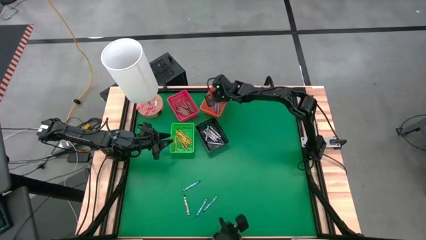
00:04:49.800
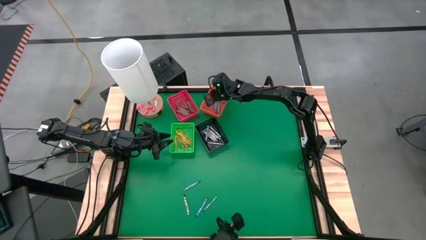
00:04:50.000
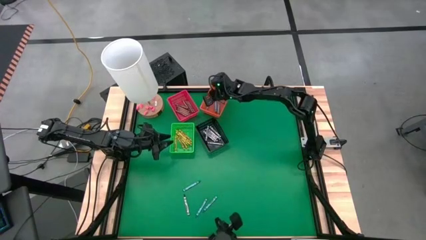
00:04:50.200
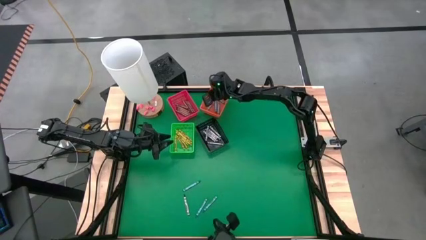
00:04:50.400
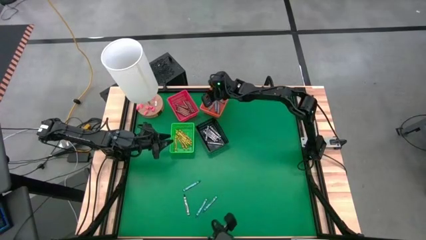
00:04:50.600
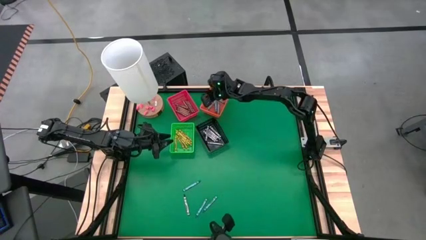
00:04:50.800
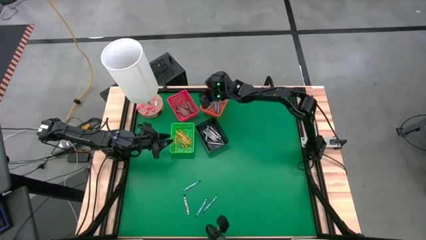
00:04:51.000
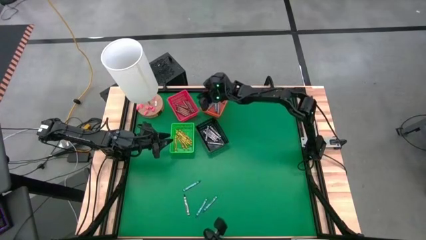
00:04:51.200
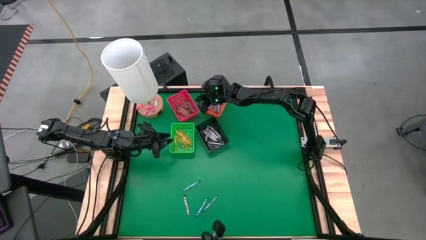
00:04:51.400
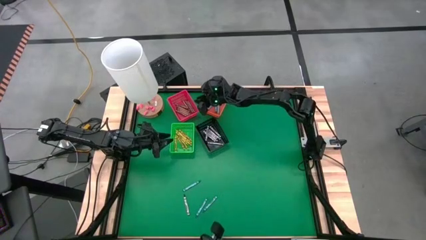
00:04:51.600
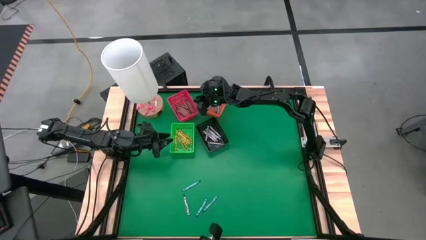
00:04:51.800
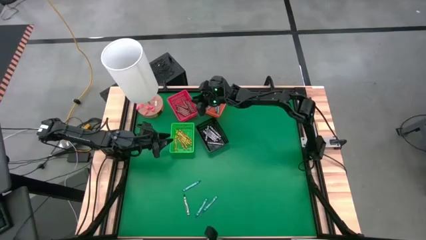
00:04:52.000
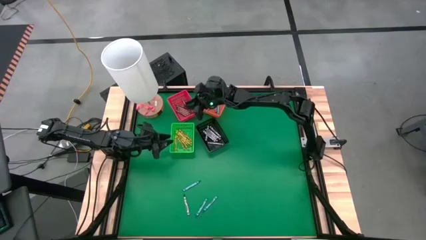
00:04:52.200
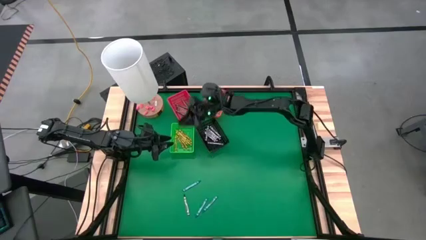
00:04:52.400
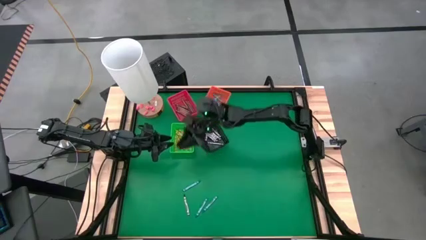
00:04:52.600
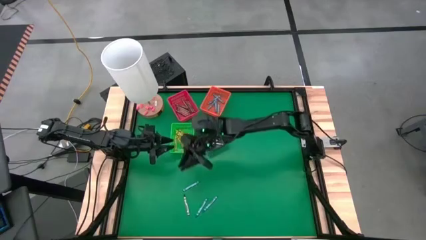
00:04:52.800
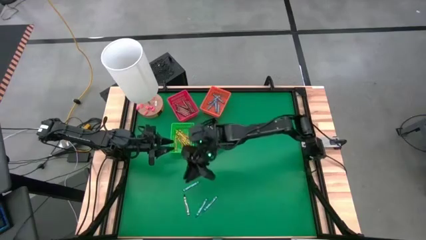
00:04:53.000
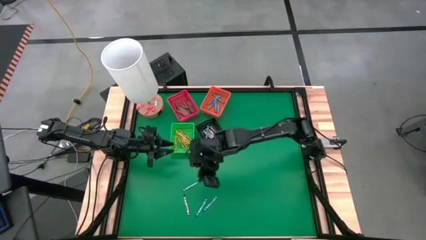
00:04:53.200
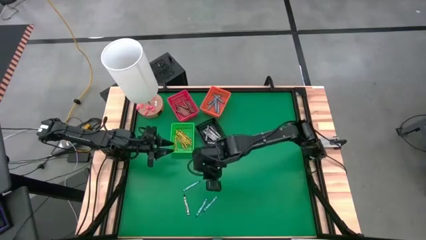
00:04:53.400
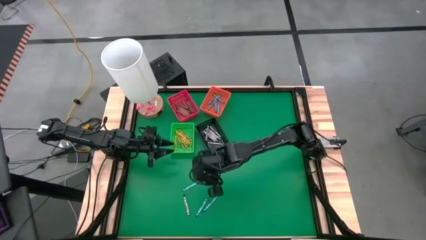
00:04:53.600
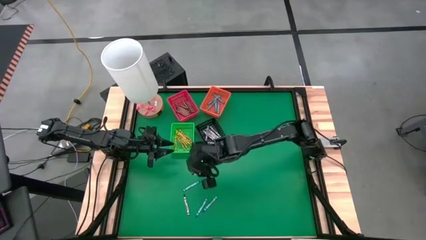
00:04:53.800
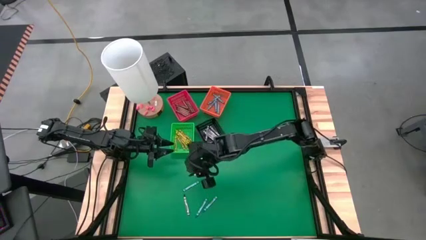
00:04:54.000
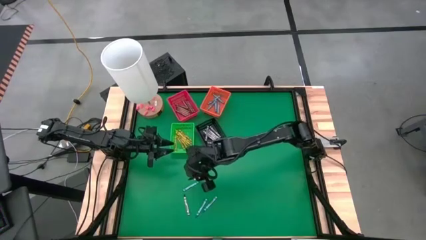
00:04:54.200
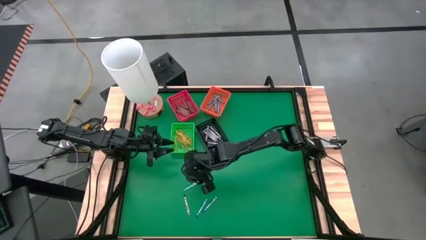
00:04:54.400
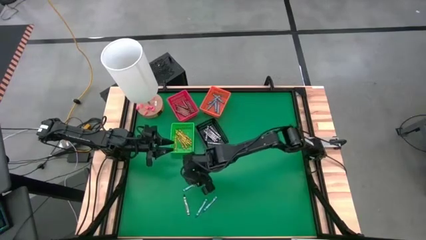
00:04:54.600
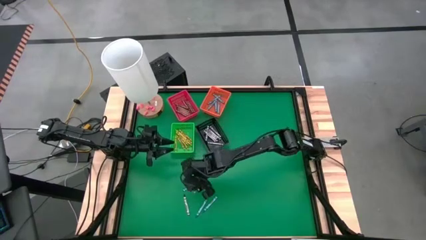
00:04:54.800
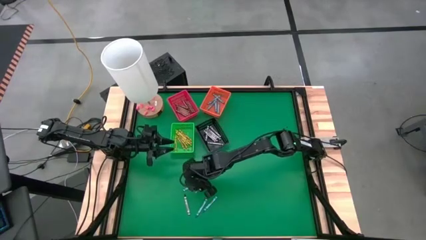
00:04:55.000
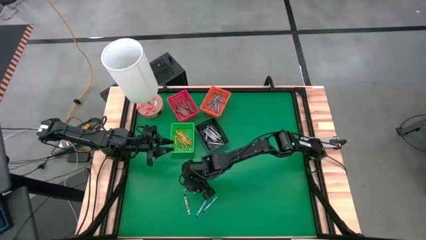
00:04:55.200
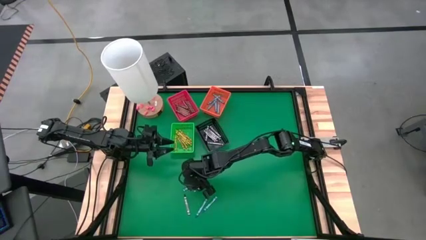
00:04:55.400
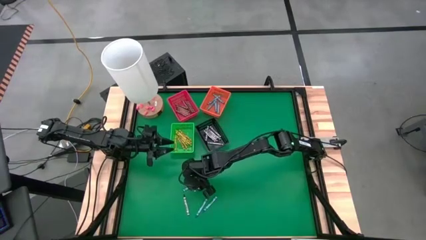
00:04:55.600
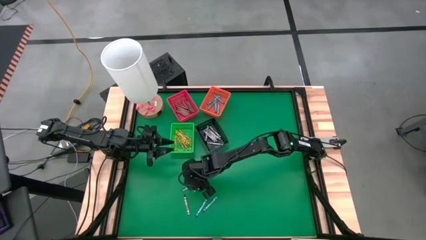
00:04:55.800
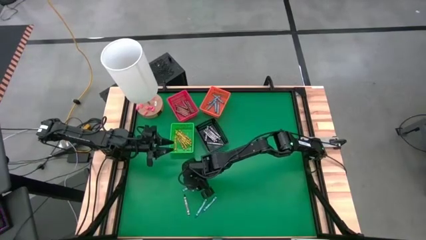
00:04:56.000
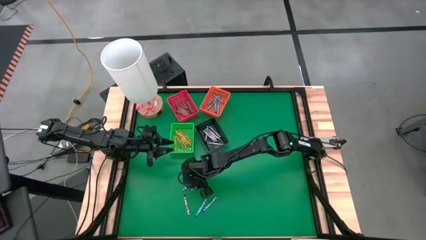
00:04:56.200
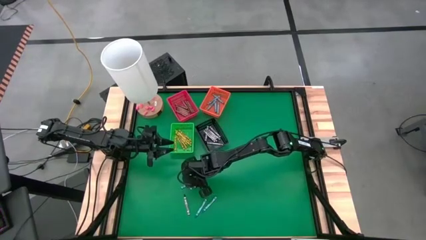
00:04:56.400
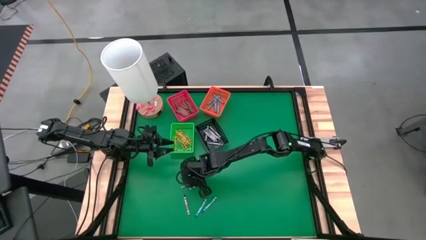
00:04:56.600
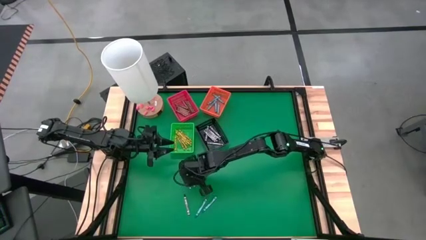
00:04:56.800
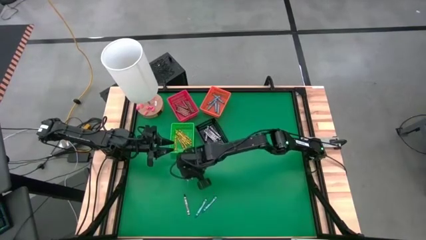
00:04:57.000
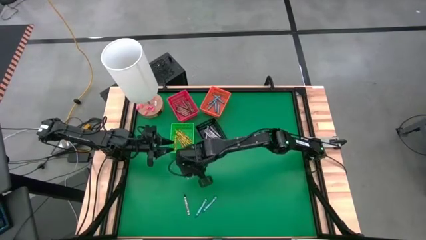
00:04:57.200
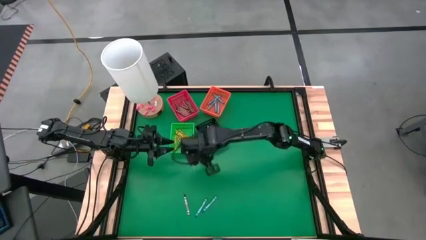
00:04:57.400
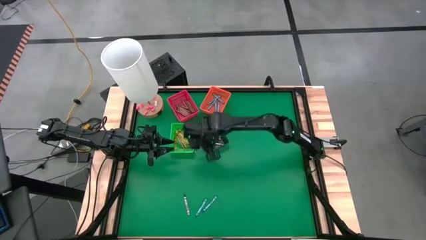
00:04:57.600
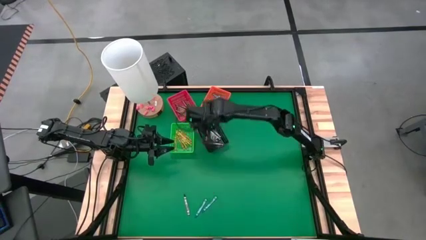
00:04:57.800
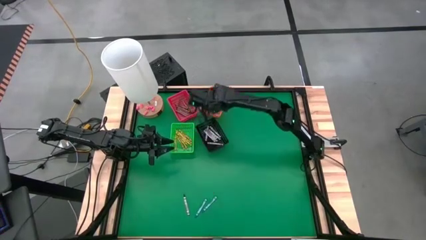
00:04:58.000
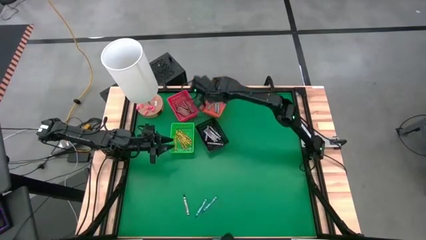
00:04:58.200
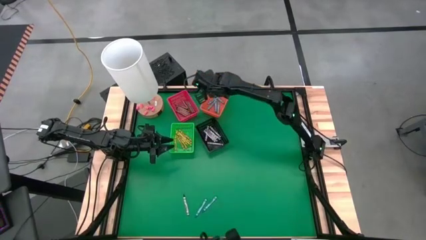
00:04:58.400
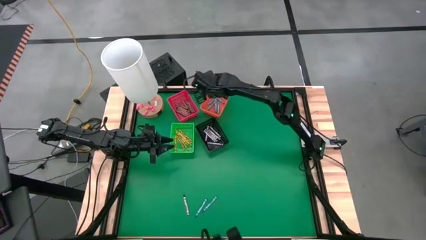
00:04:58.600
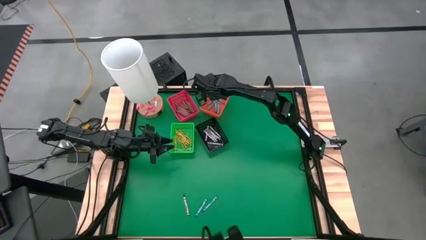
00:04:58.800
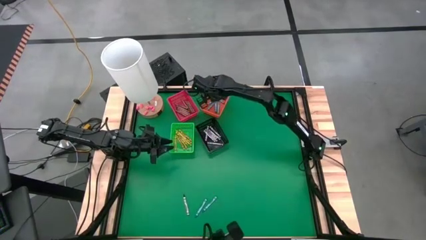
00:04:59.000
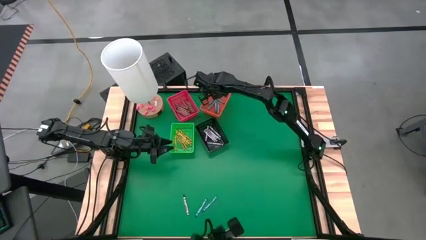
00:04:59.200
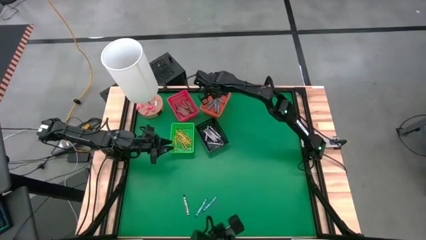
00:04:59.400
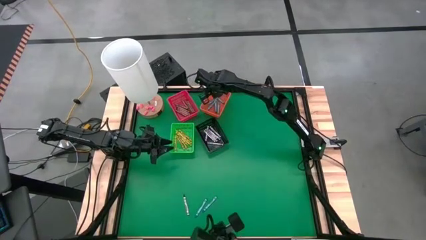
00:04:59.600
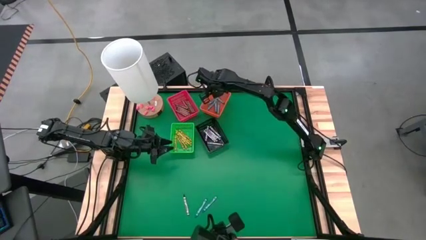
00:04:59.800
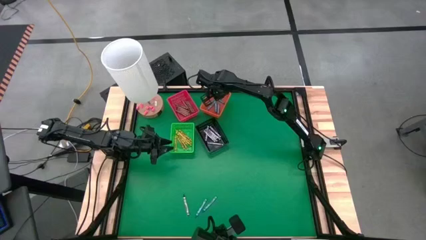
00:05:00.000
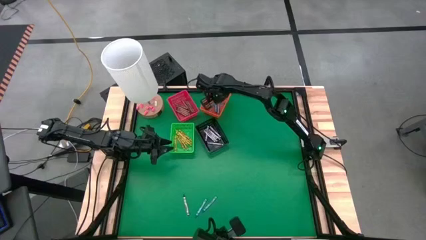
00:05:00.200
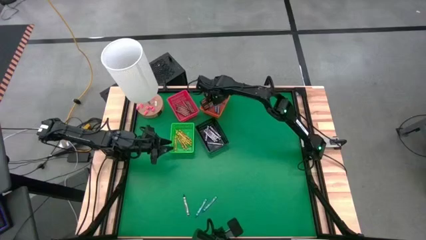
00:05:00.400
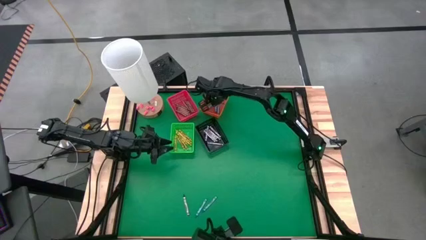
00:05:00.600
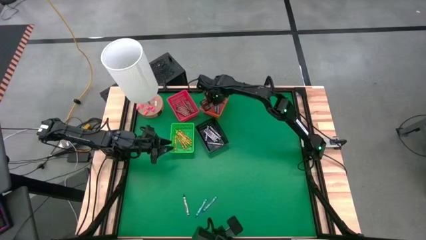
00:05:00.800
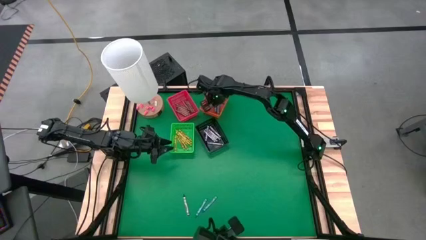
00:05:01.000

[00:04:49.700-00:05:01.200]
Task: Sort crayons
Put the blue crayon into the orange bin

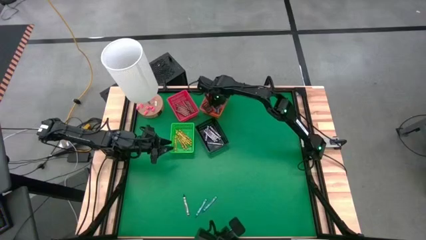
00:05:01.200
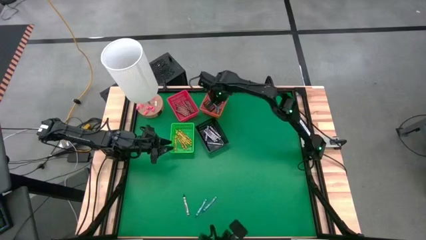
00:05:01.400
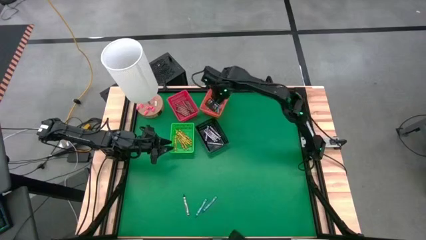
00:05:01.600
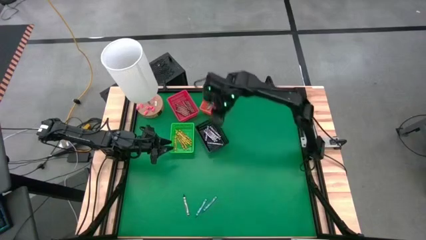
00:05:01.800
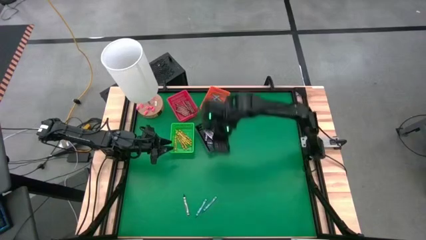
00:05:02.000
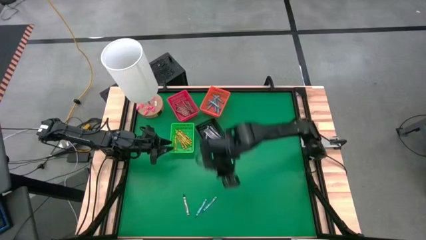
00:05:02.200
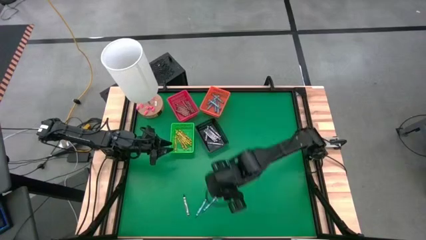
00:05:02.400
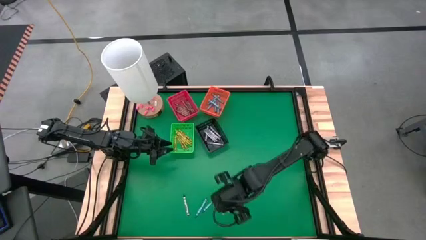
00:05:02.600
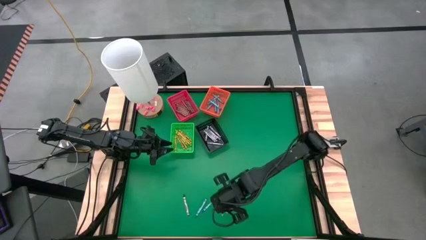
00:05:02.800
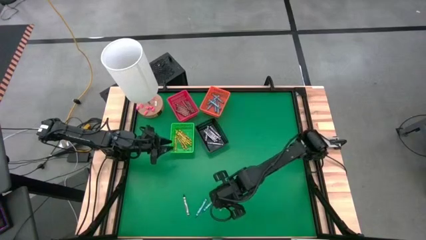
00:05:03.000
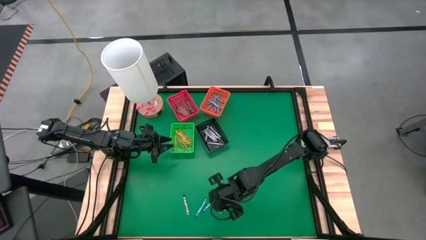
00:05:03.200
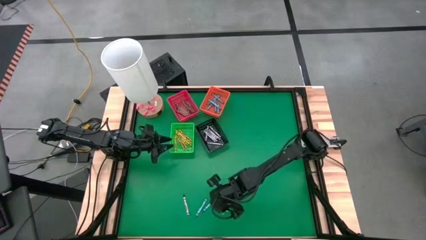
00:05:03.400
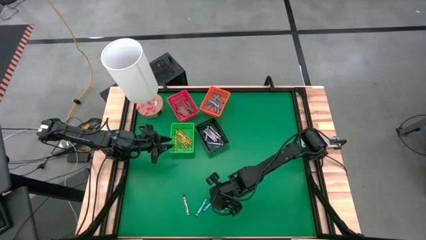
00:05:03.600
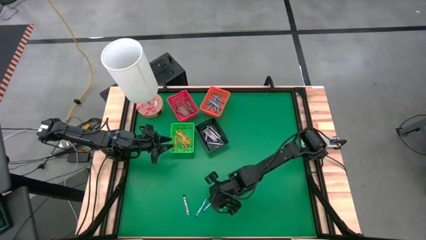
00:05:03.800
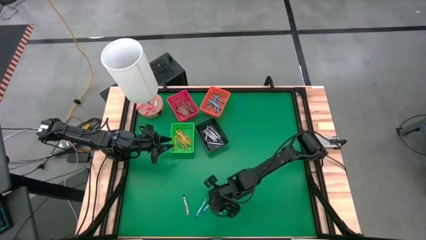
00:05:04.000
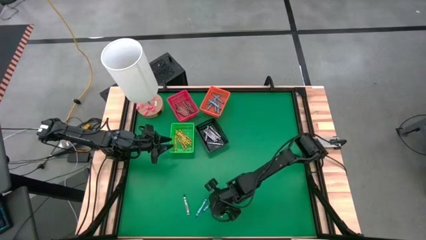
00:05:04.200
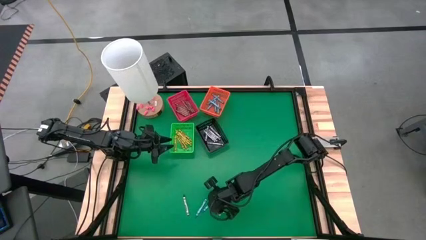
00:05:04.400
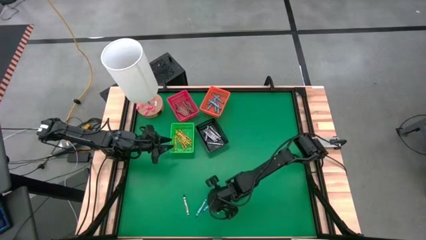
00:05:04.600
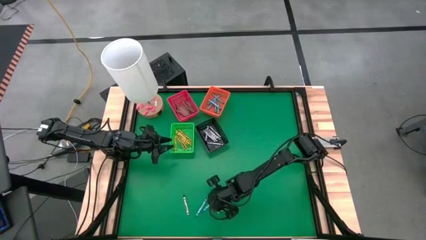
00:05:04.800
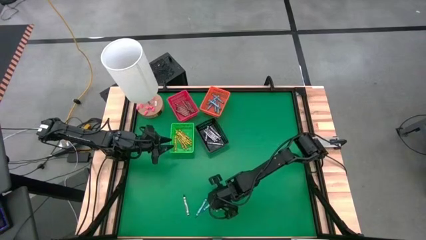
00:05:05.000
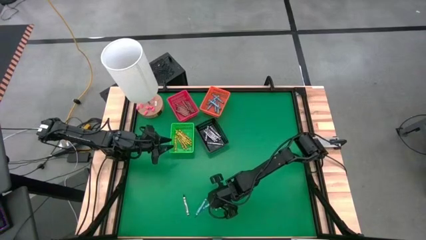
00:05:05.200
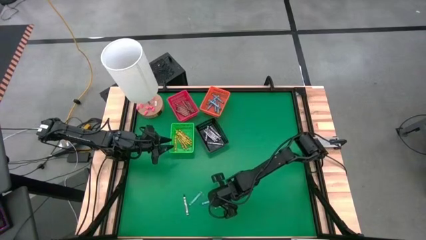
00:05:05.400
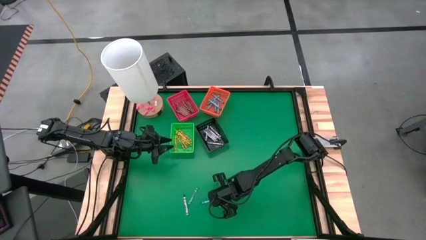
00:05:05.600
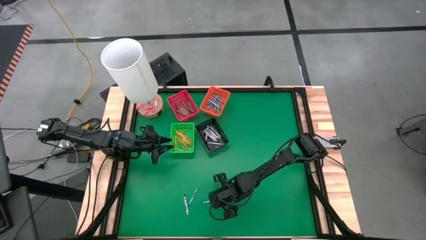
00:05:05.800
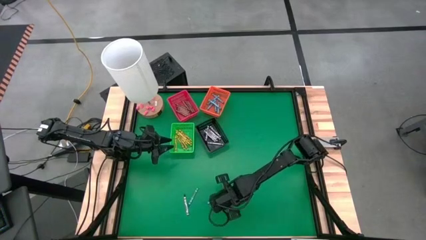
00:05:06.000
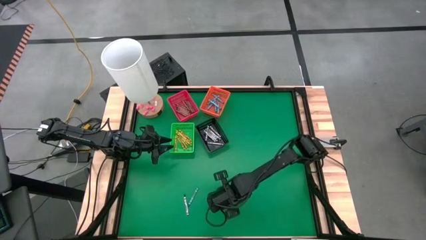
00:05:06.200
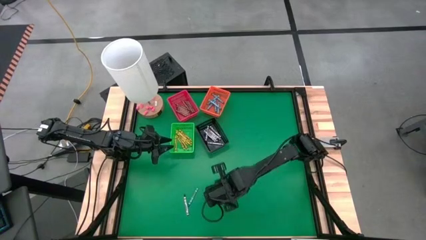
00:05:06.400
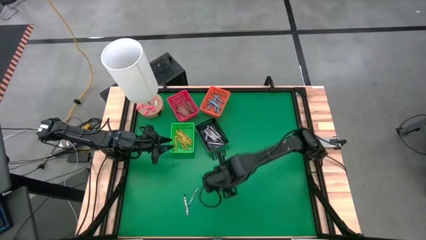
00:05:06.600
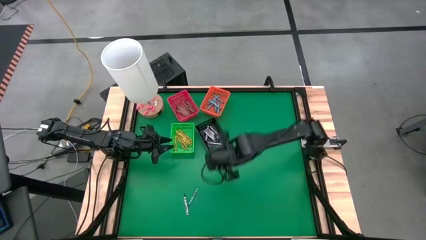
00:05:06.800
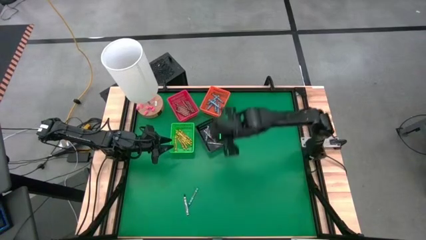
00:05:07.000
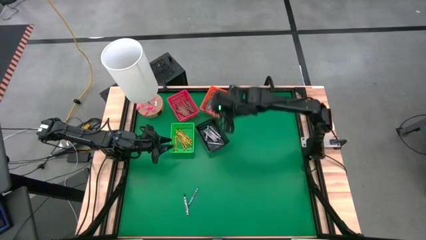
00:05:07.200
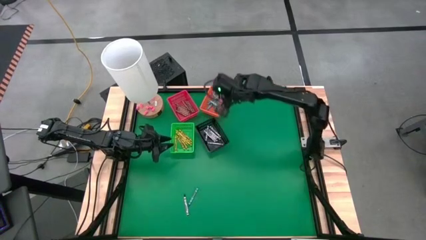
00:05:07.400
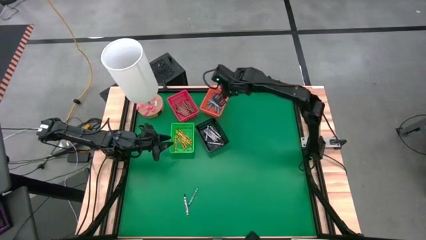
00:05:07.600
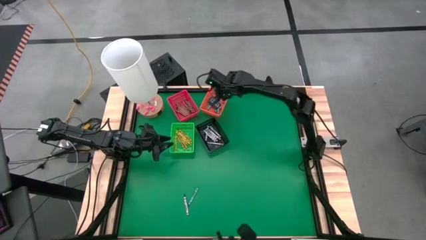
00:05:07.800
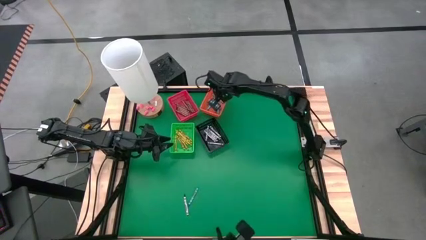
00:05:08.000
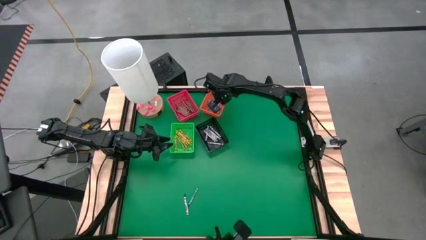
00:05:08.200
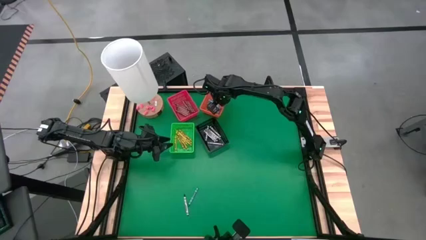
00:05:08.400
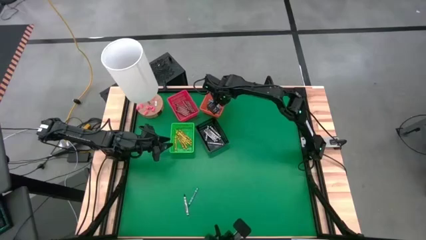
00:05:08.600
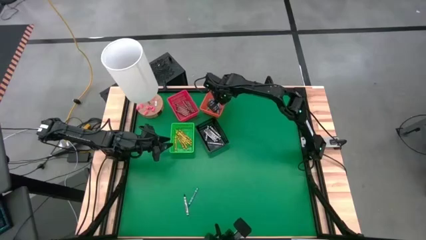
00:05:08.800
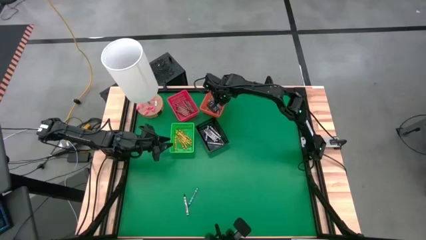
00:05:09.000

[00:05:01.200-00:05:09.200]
Put the blue crayon into the orange bin
